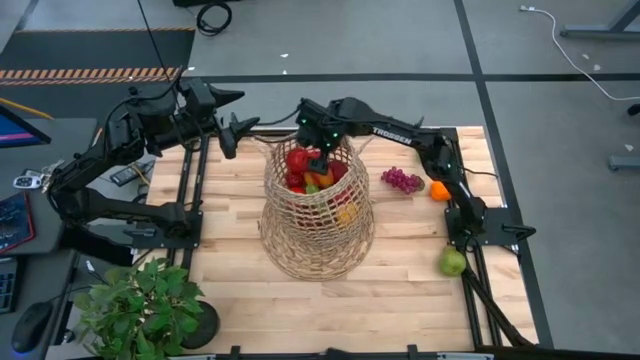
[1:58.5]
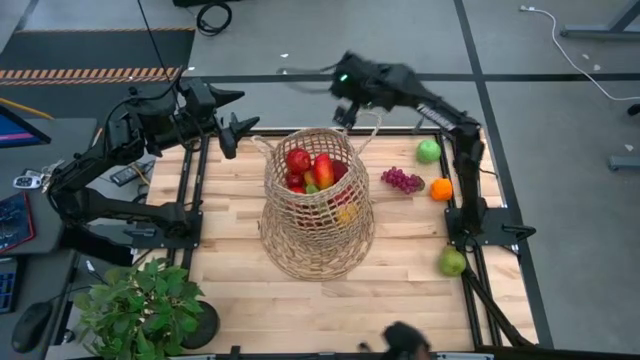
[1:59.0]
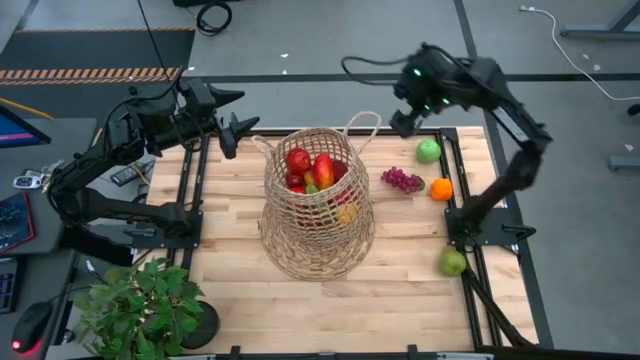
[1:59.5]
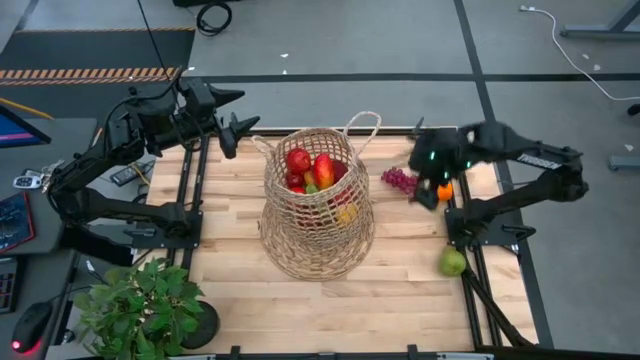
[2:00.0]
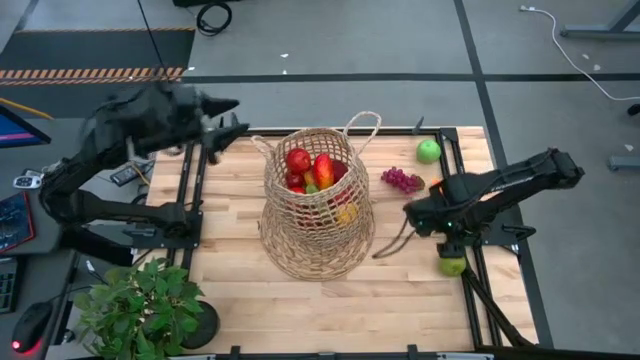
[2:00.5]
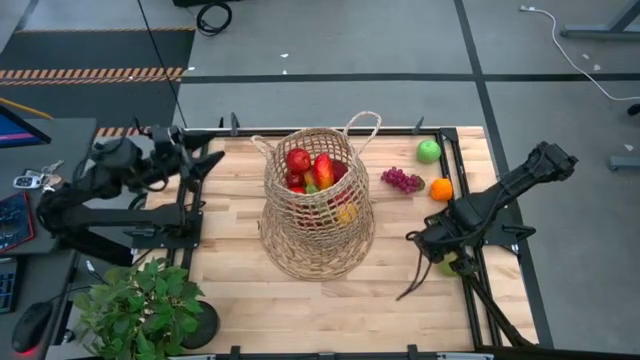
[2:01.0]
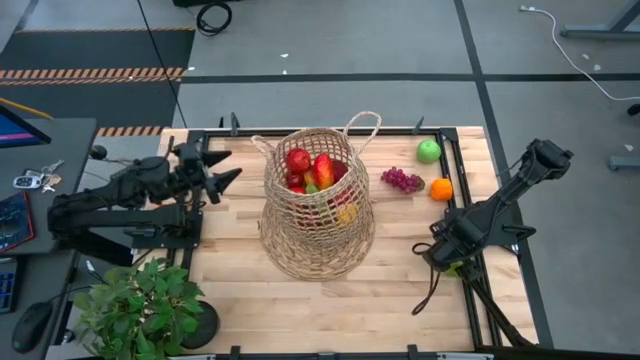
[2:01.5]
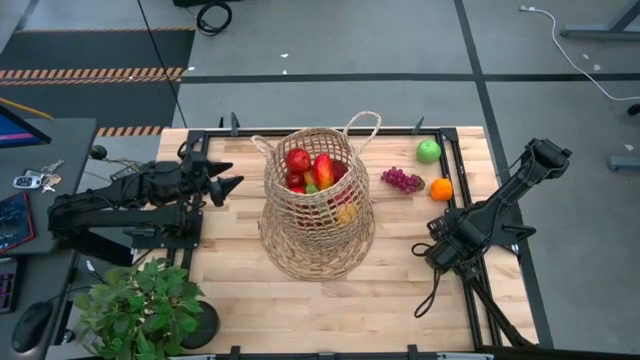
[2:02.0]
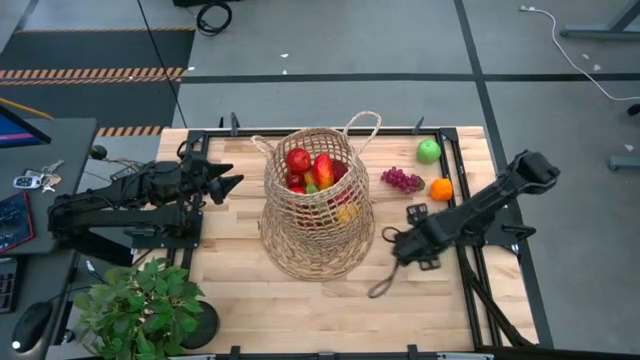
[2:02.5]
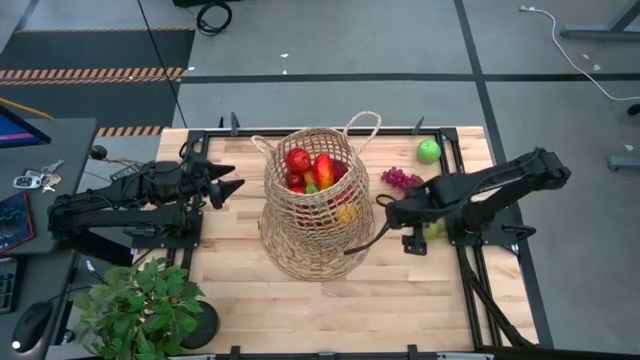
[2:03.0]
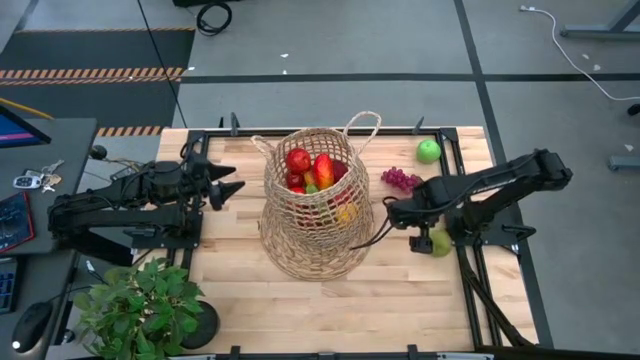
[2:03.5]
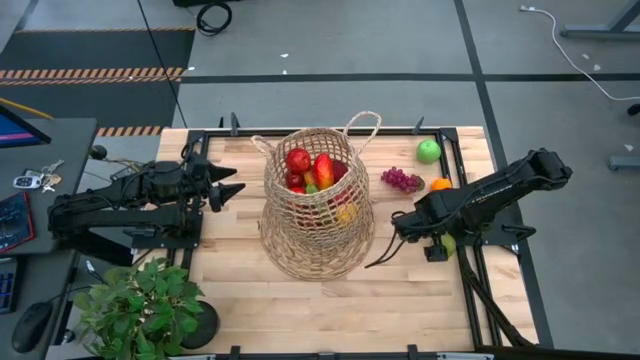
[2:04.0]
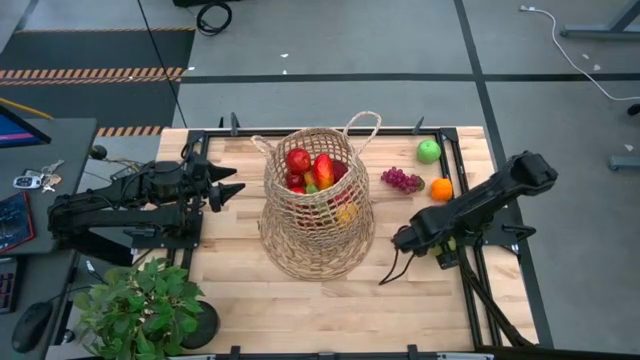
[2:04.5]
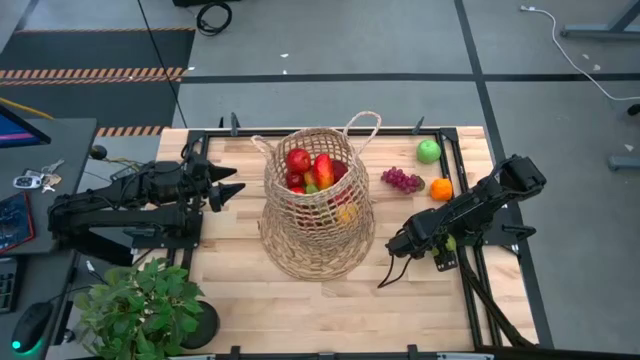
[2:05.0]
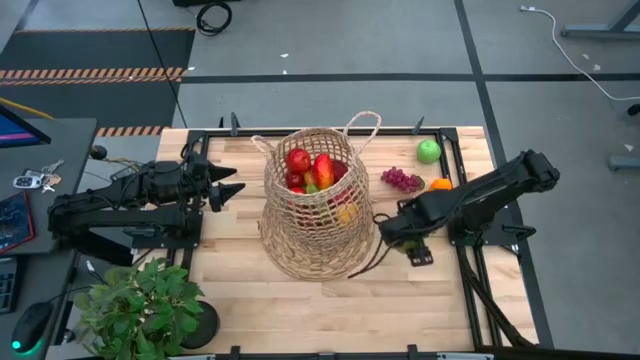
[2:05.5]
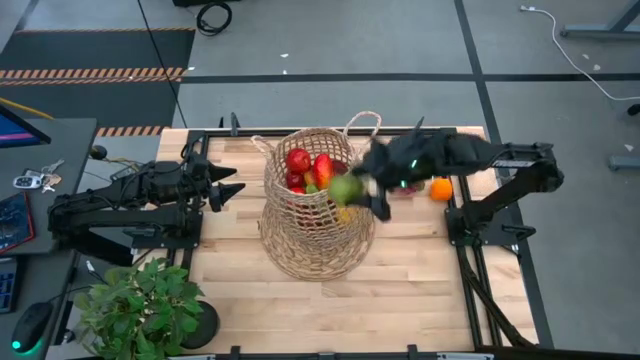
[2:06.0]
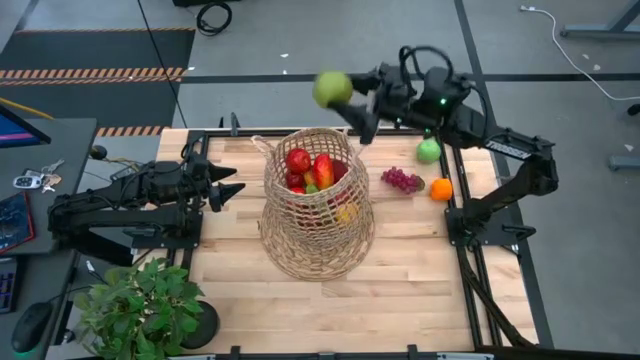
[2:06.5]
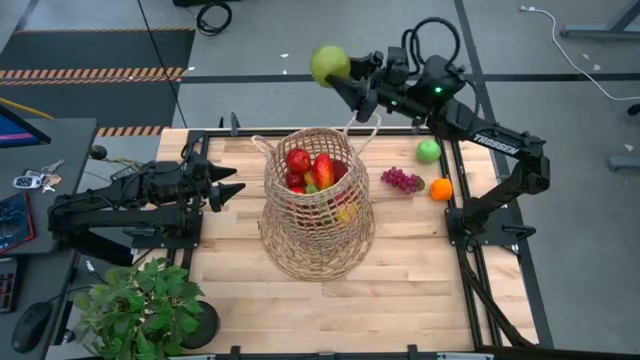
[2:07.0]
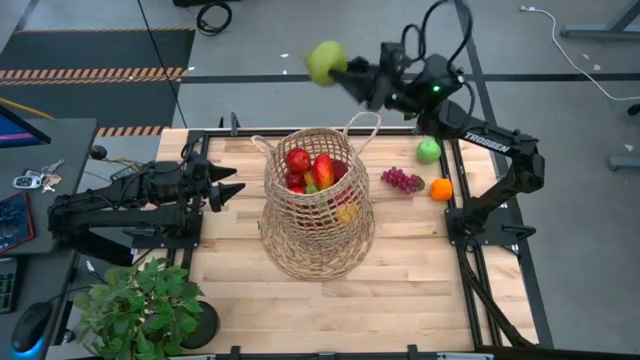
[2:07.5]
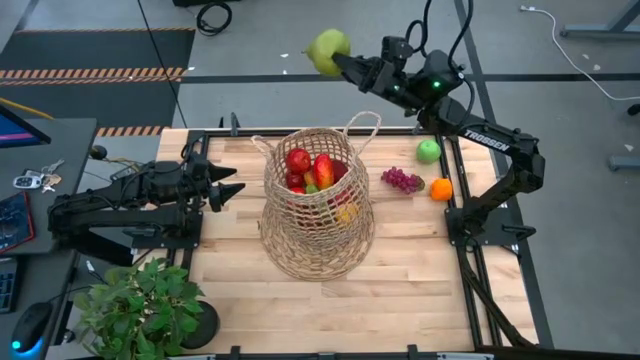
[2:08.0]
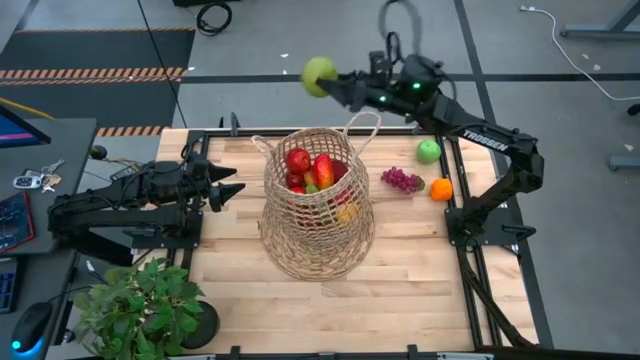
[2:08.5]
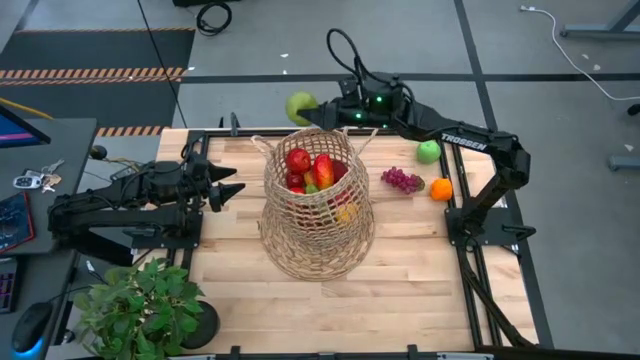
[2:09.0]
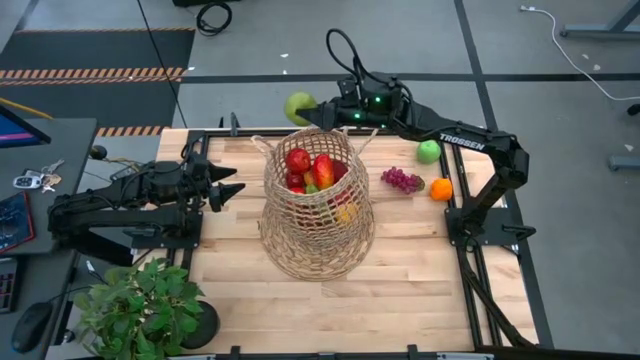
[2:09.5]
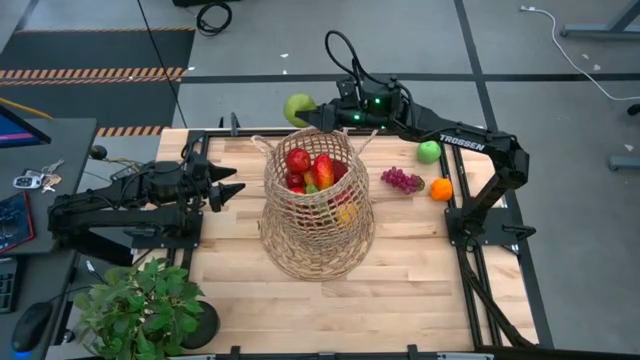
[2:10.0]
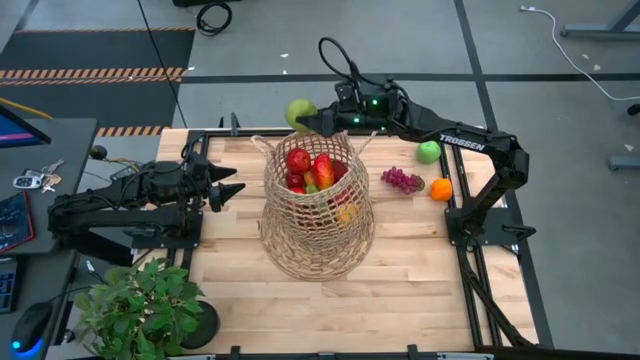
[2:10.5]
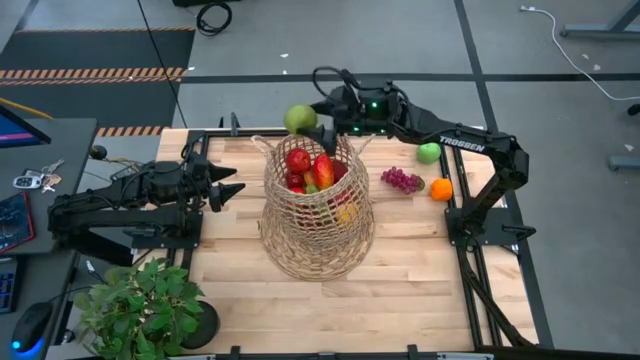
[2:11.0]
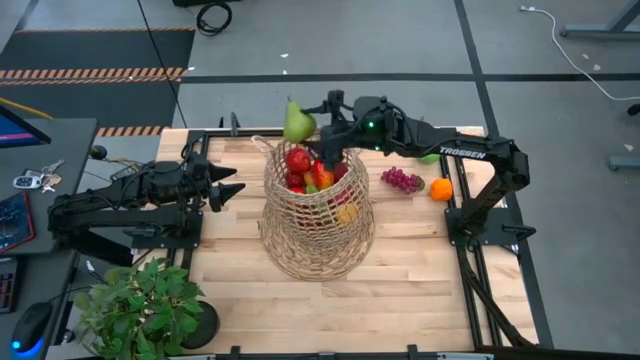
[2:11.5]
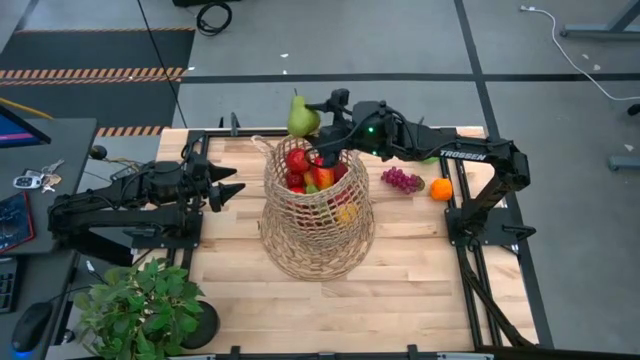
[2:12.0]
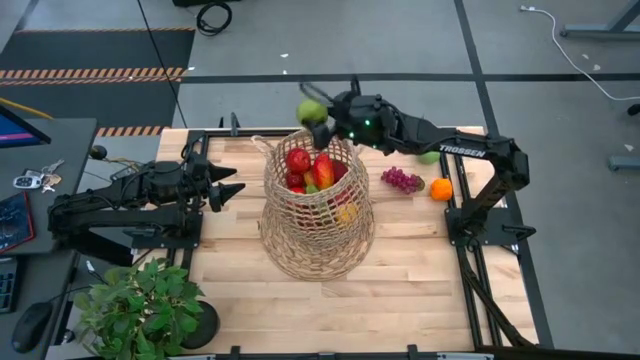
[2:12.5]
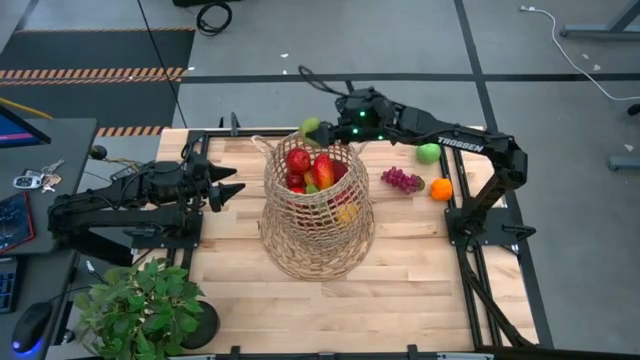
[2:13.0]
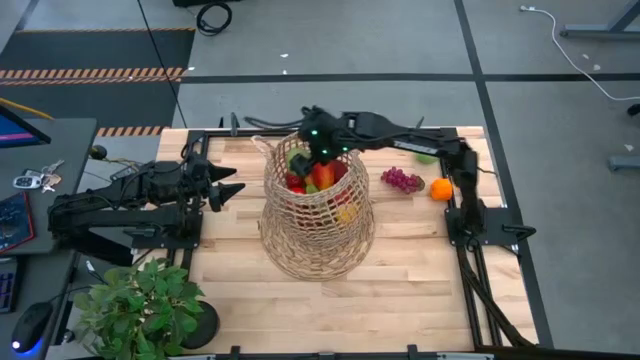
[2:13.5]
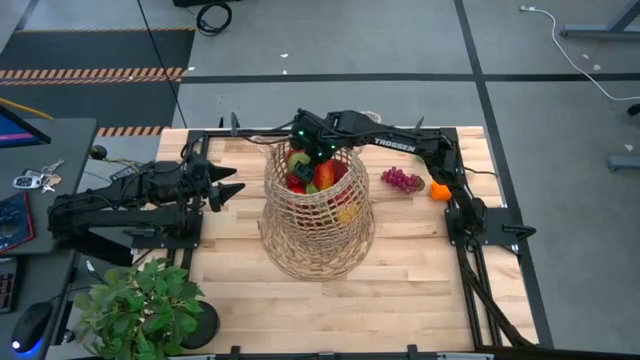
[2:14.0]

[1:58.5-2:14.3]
Task: Build produce basket
Put the pear into the brown basket

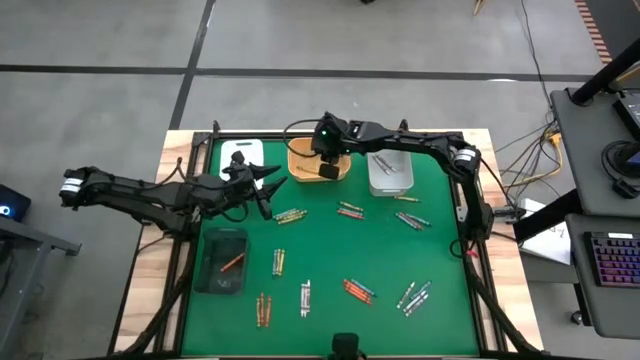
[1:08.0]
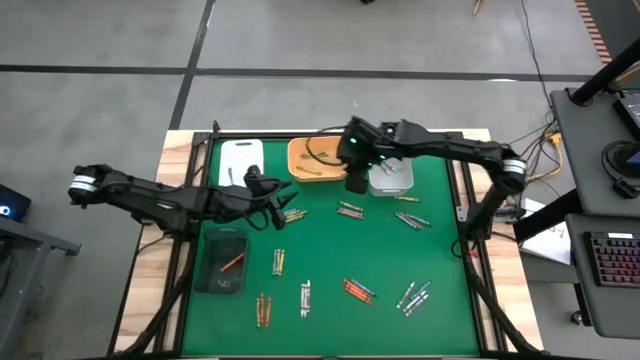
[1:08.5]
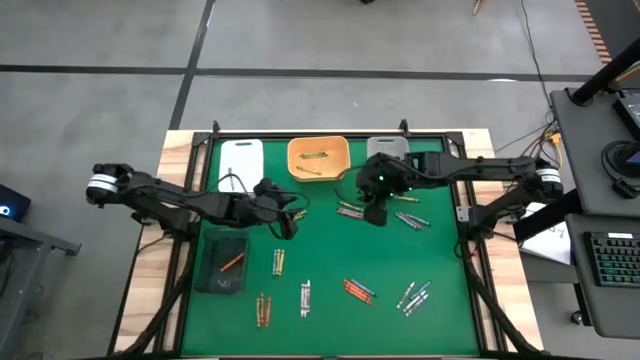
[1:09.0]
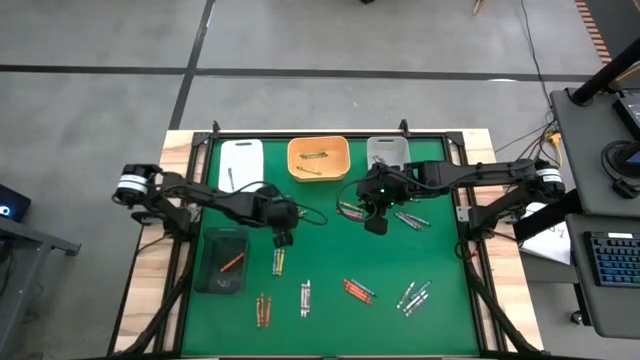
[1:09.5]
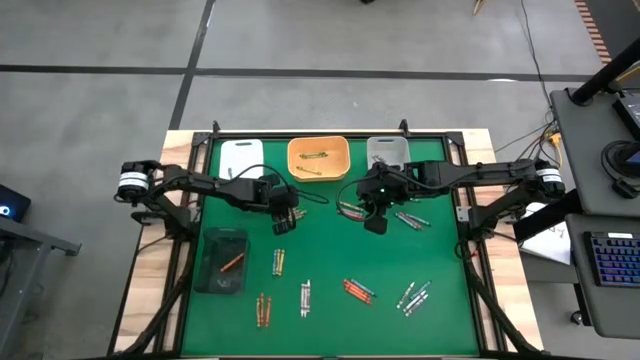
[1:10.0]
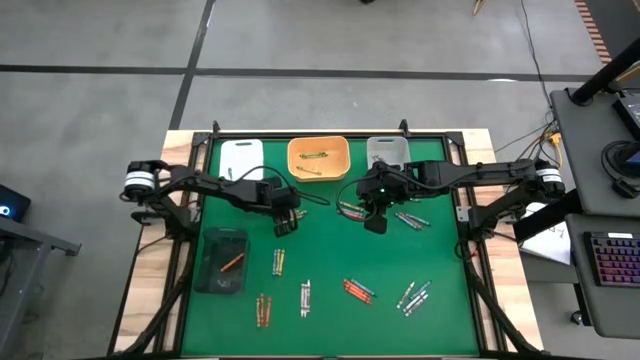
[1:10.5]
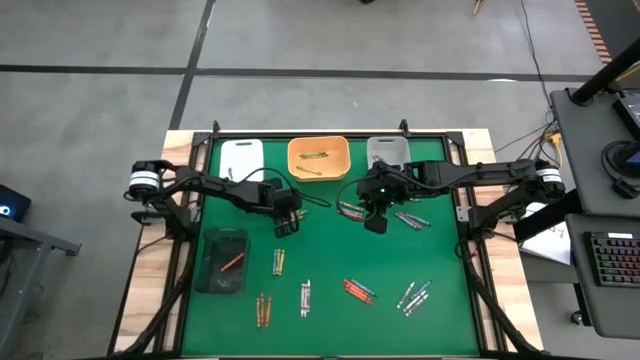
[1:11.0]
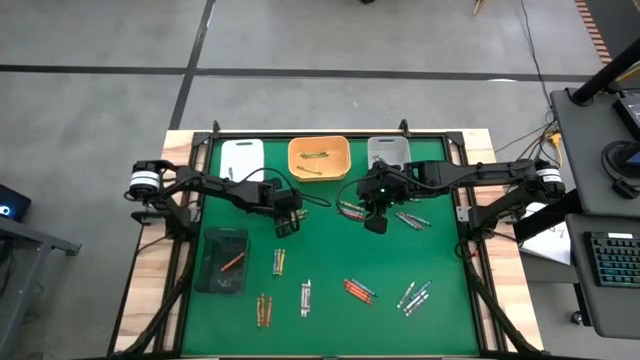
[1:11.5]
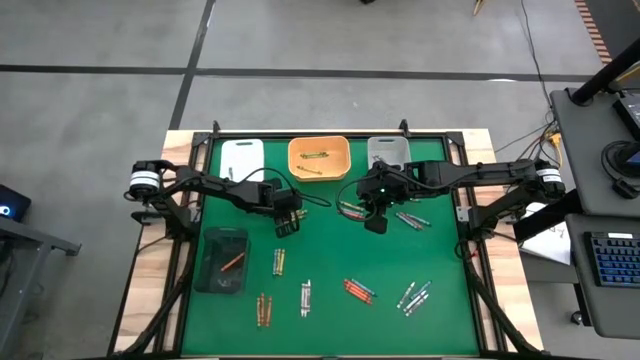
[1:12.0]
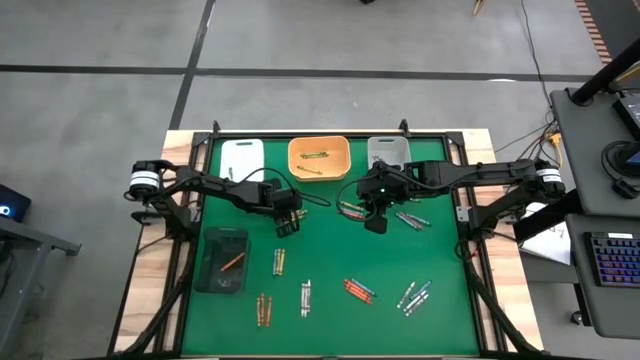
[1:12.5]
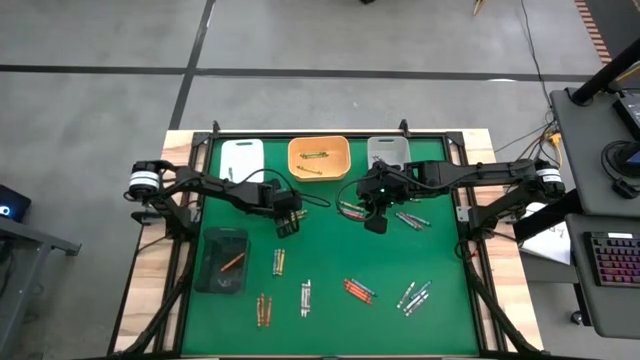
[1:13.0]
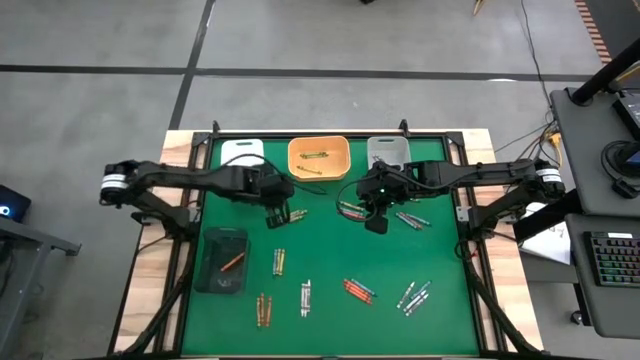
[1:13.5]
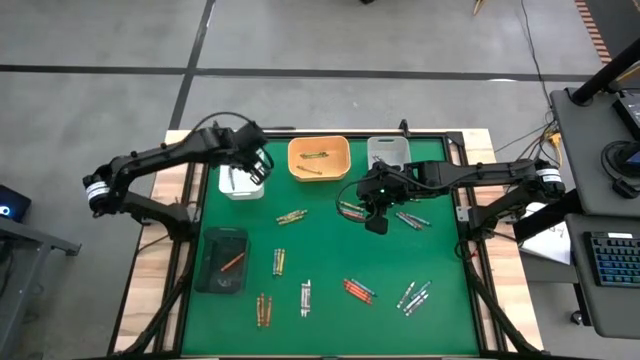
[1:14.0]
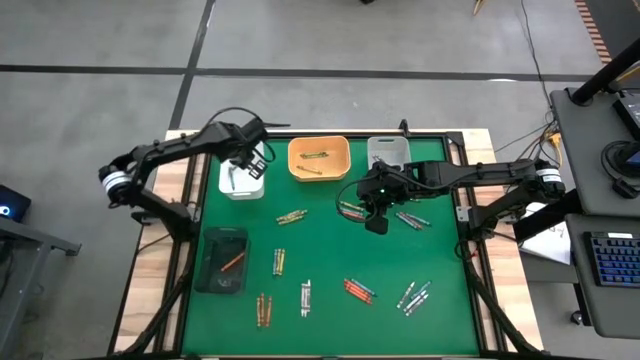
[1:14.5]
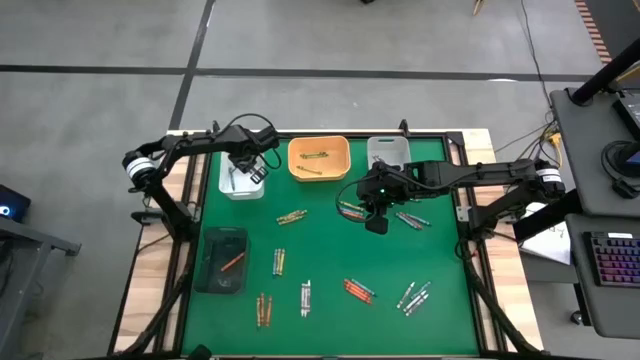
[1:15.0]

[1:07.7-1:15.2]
Task: Sort crayons
Put the blue crayon into the white bin
